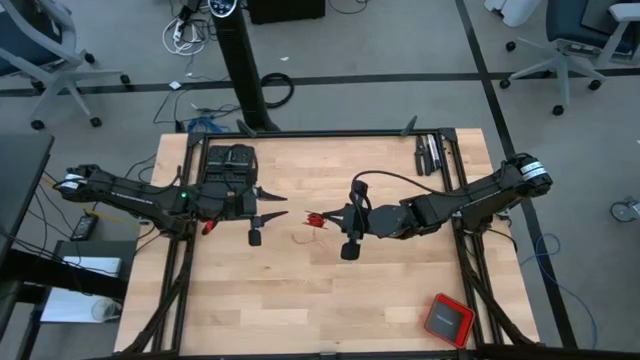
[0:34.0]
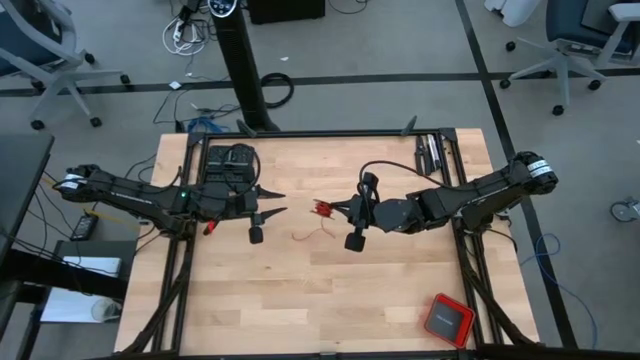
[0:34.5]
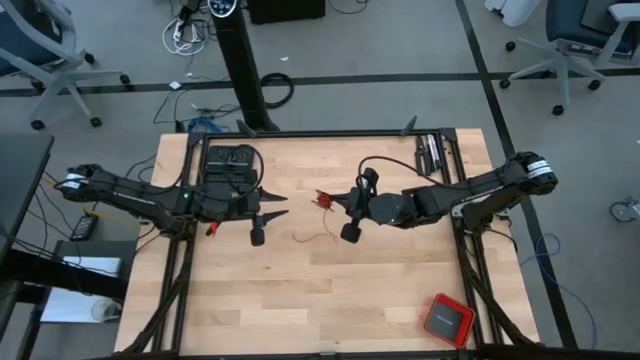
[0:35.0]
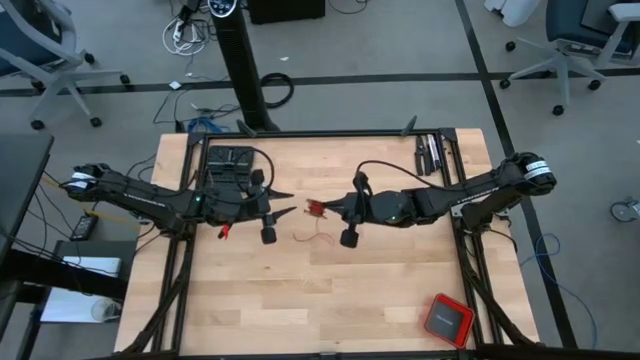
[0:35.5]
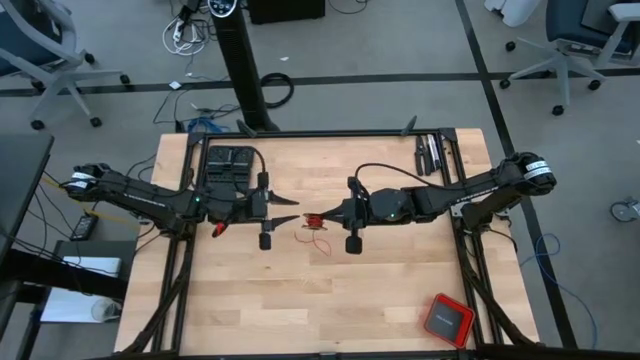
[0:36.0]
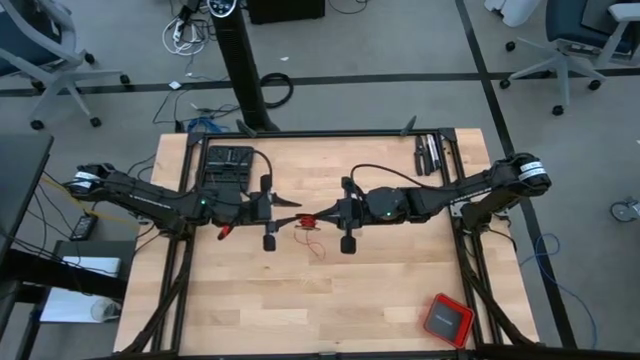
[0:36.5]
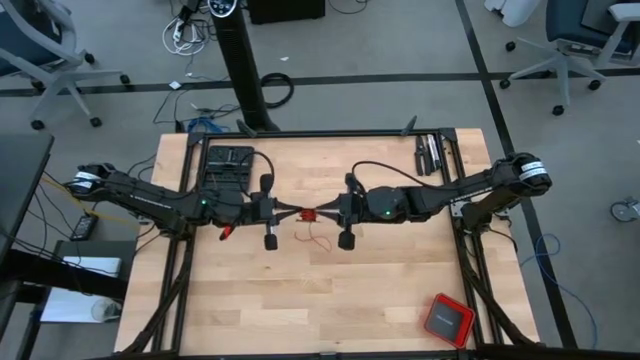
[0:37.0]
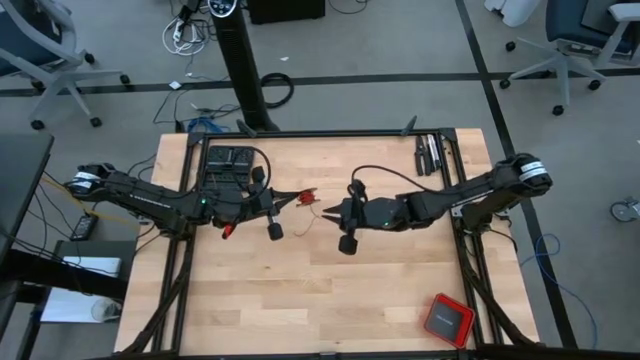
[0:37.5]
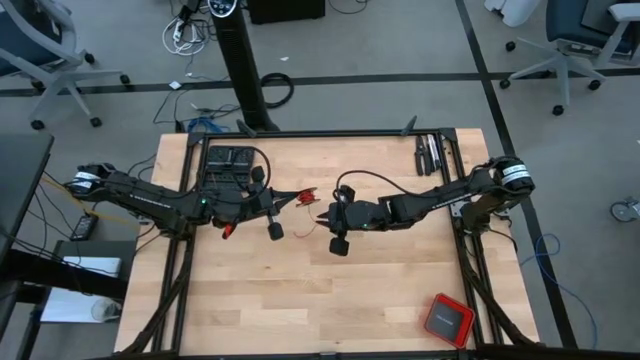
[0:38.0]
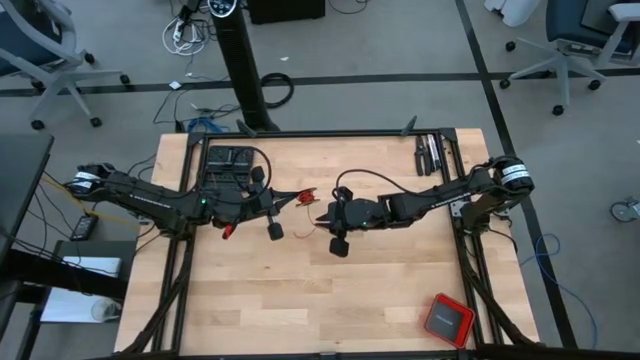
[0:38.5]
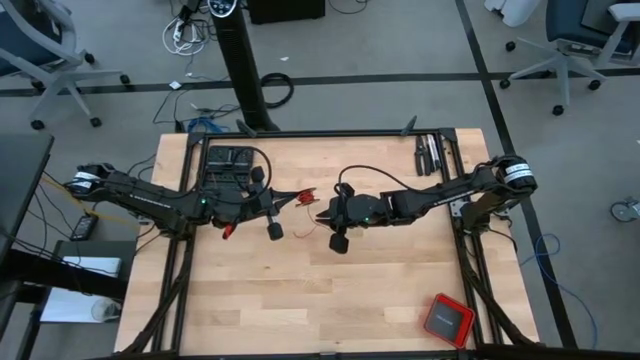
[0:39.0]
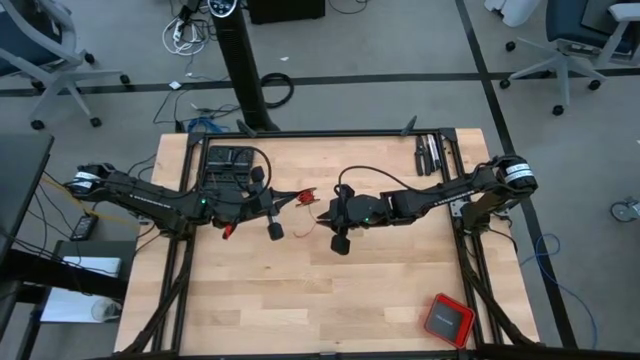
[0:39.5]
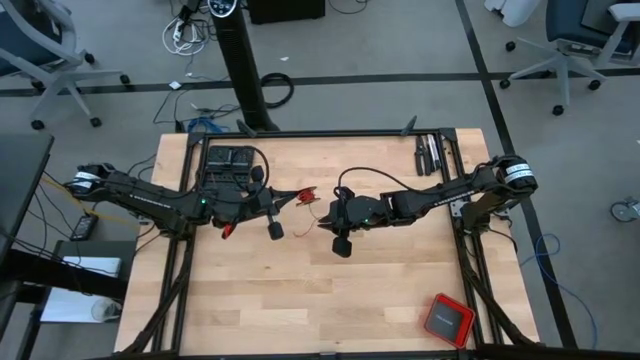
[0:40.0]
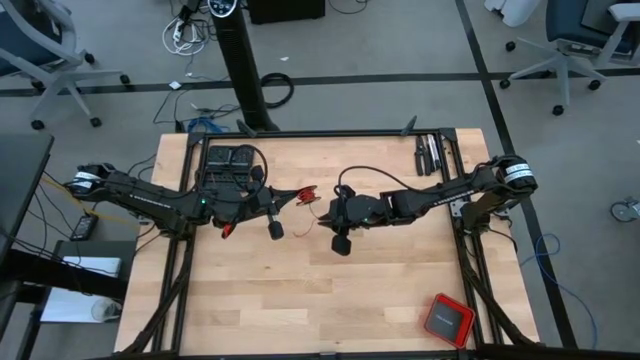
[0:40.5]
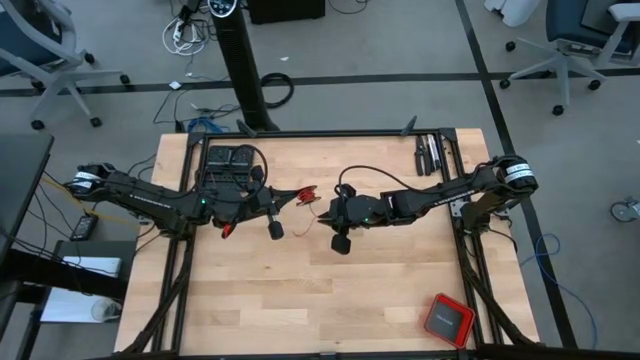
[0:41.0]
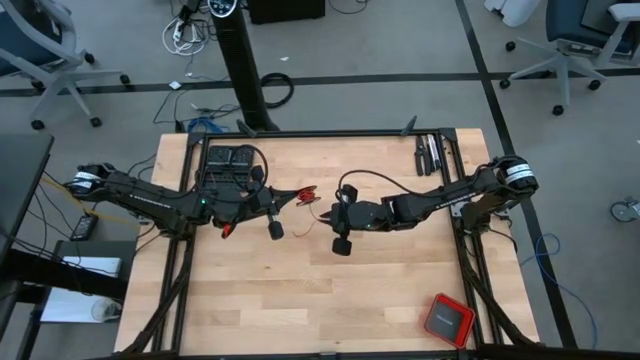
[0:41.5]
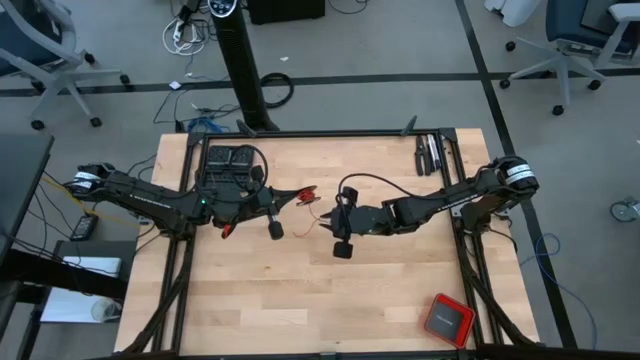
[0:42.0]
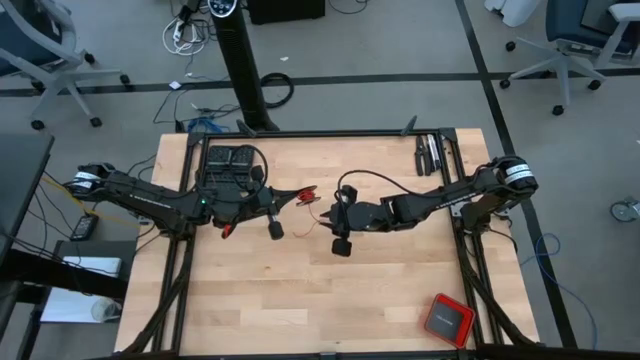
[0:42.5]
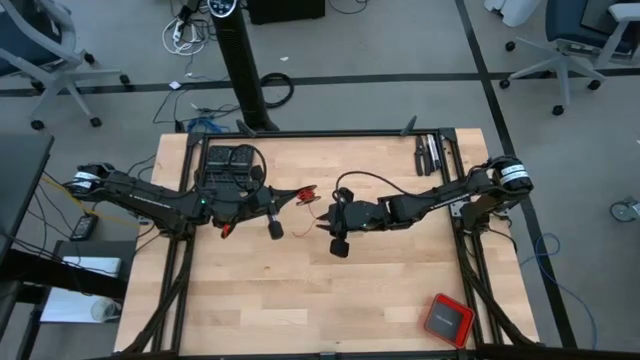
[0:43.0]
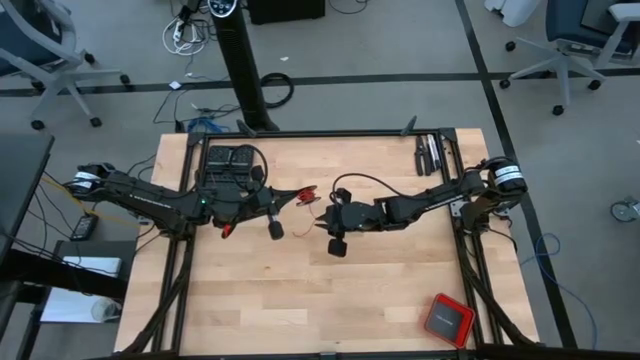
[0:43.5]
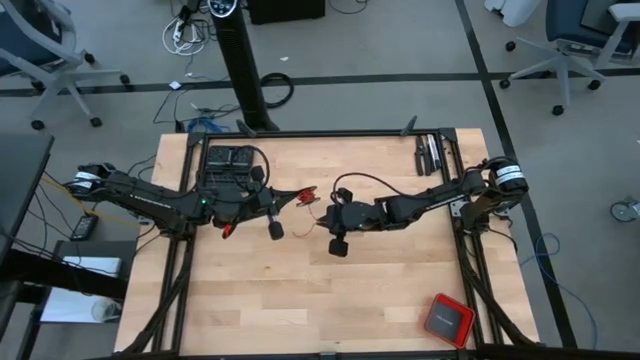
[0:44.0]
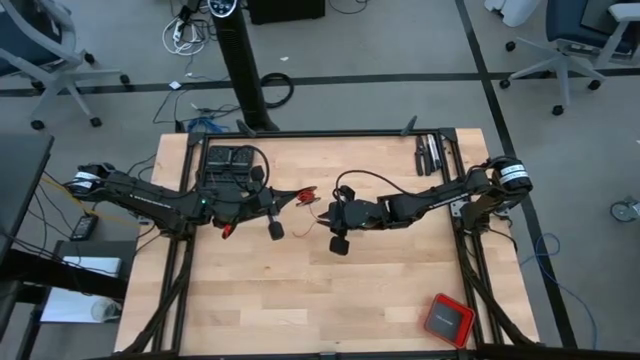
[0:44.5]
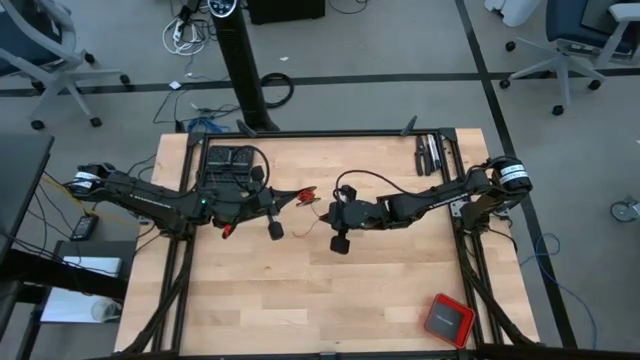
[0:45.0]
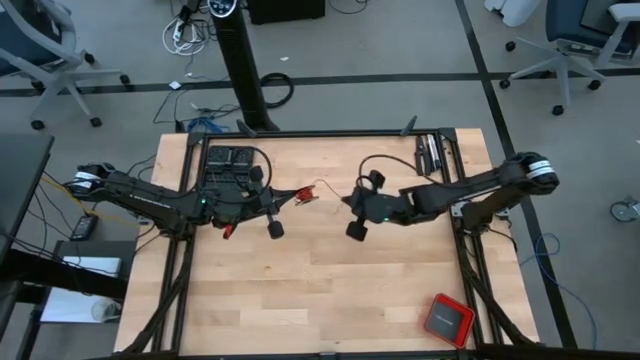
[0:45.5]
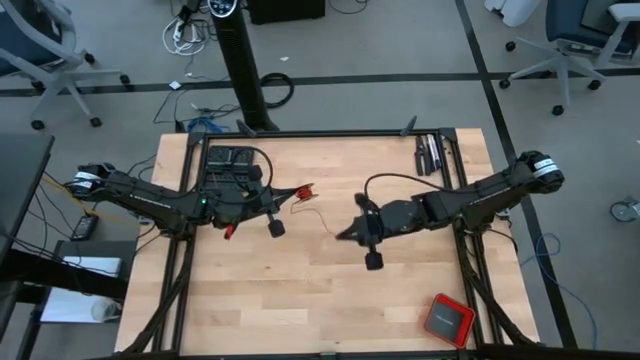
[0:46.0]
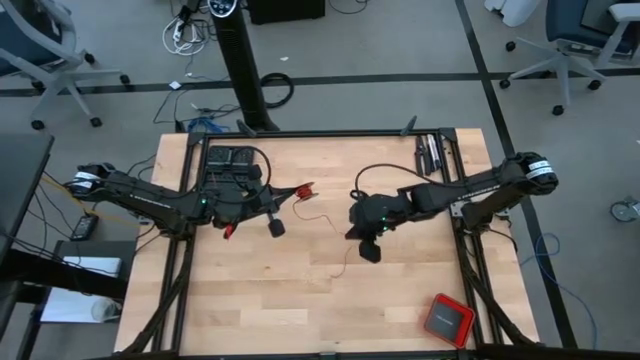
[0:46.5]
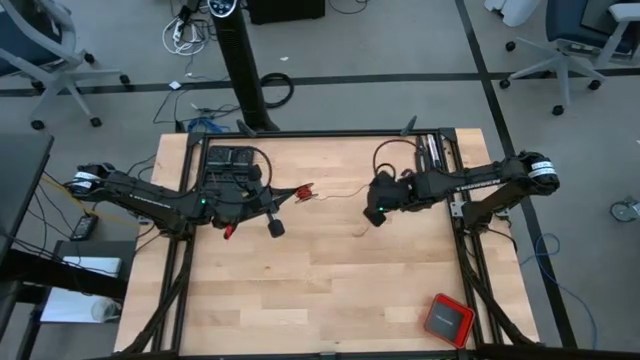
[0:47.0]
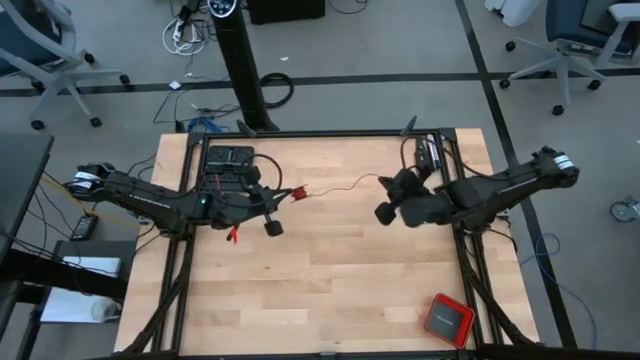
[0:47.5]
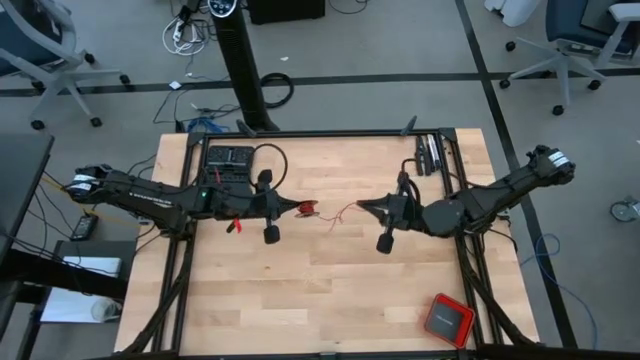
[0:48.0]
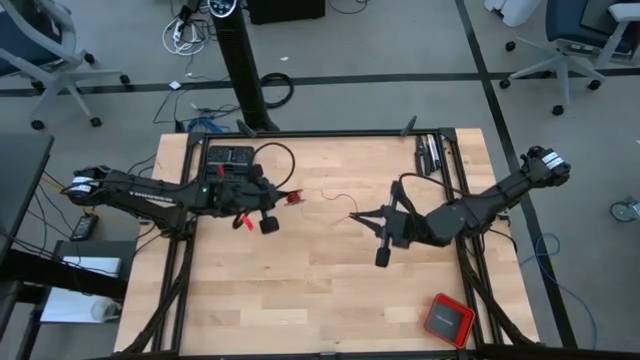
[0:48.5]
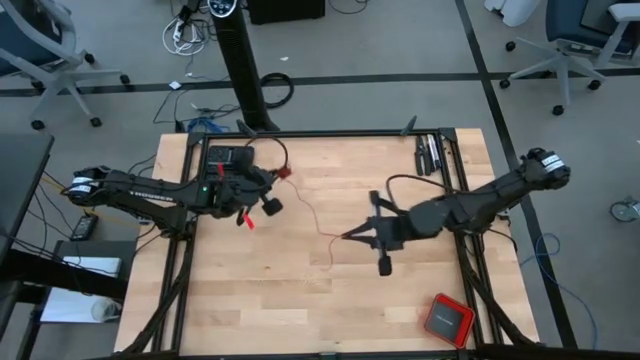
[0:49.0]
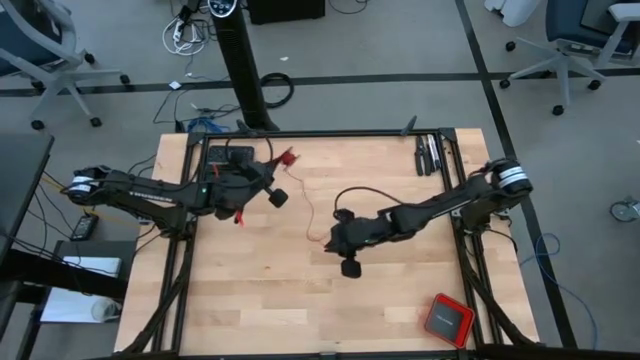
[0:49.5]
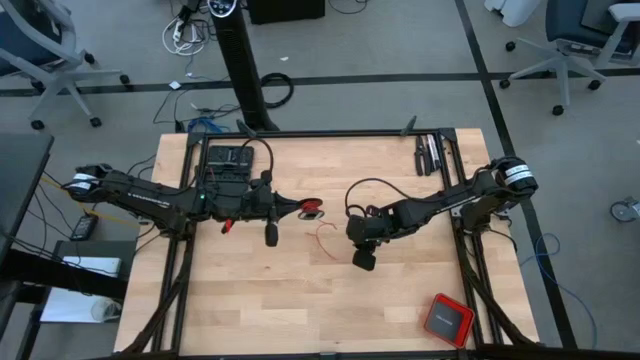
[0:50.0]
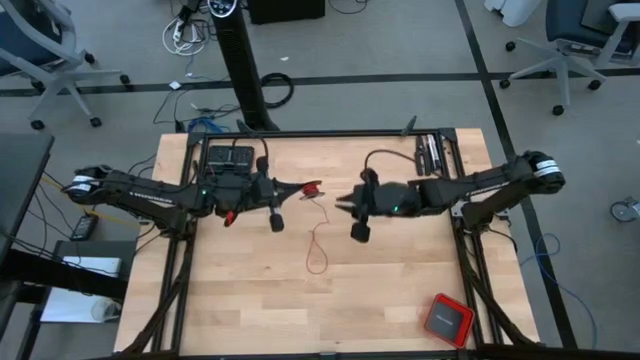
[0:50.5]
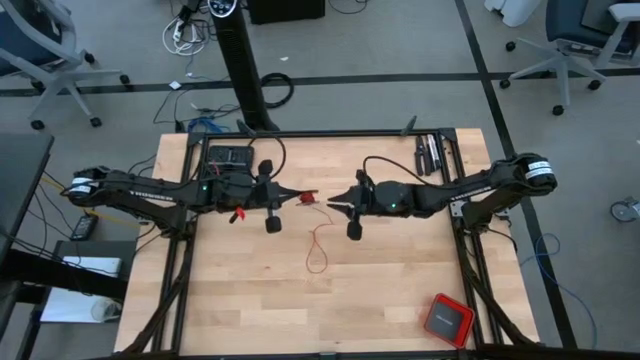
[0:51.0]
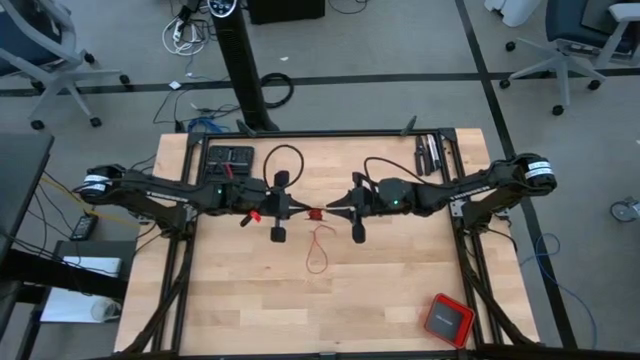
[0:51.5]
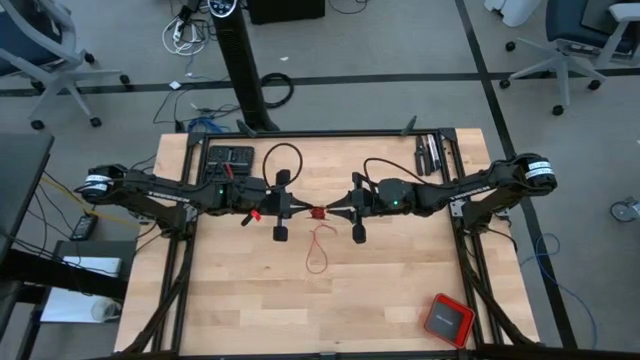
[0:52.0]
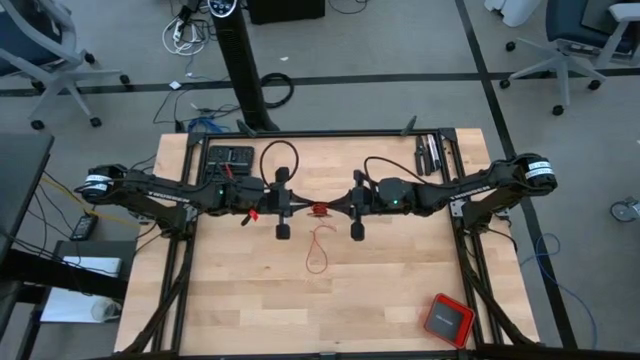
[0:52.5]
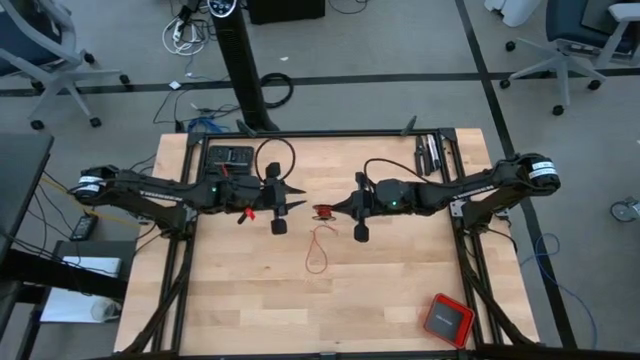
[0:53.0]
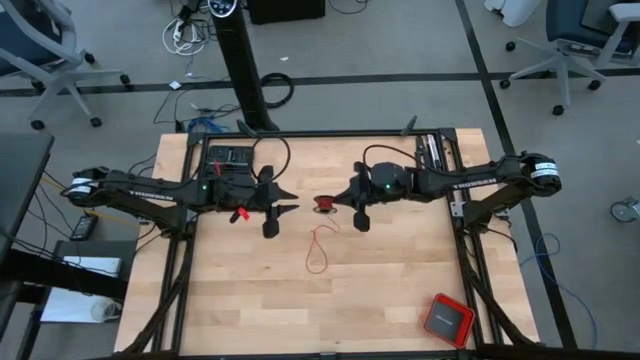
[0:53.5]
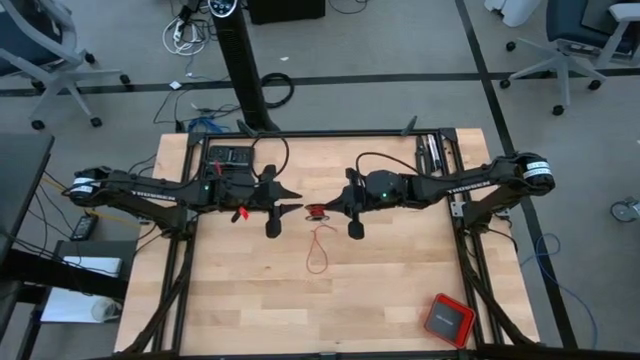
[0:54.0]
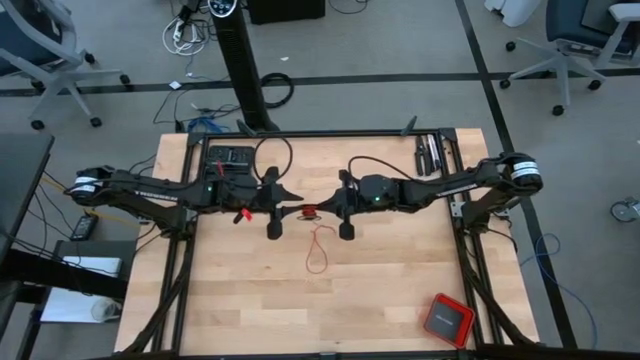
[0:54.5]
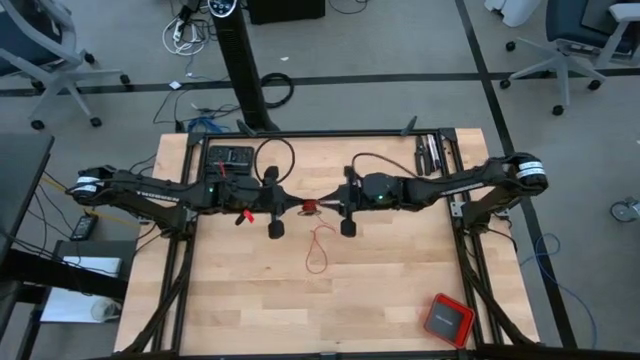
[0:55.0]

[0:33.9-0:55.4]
Task: Coil cords
Uncoil the red wire from the spool
